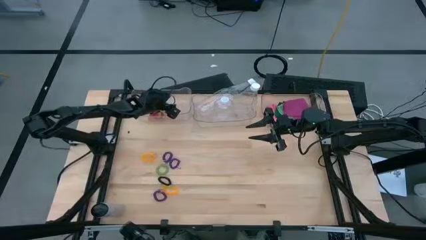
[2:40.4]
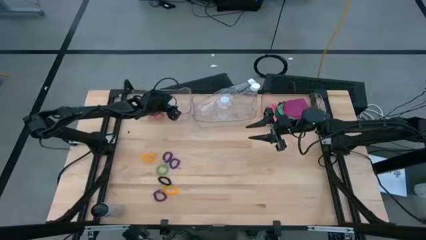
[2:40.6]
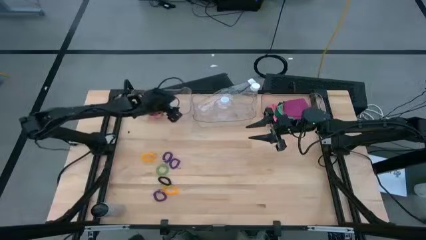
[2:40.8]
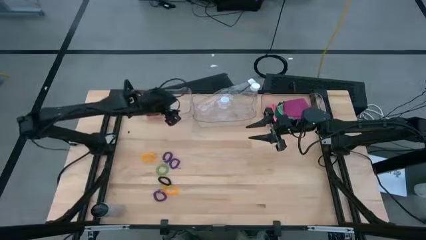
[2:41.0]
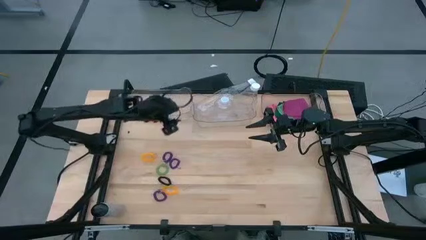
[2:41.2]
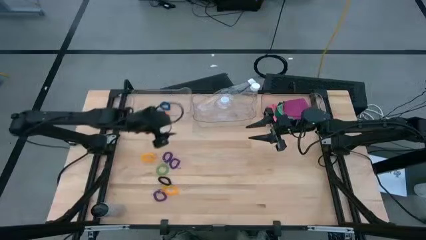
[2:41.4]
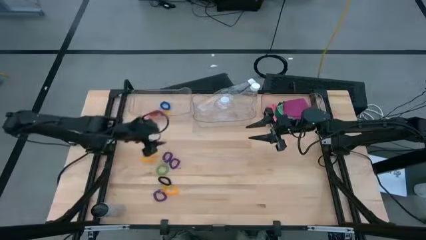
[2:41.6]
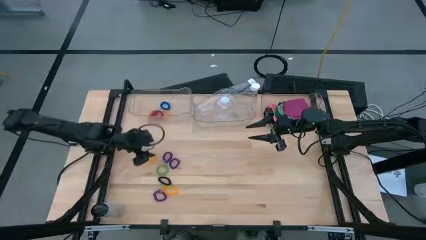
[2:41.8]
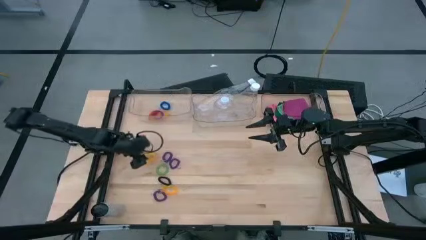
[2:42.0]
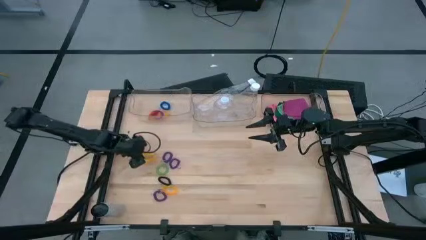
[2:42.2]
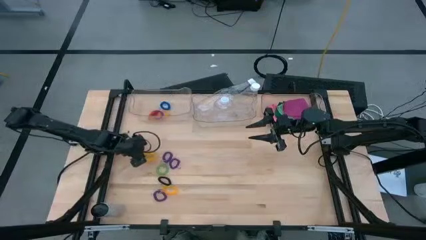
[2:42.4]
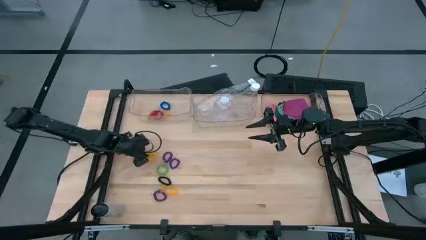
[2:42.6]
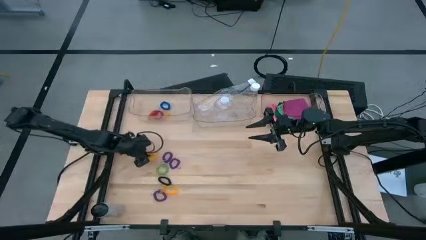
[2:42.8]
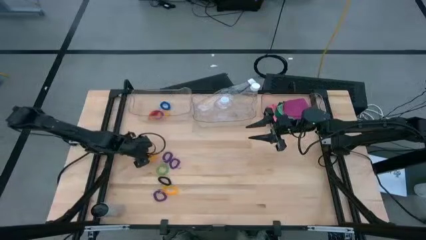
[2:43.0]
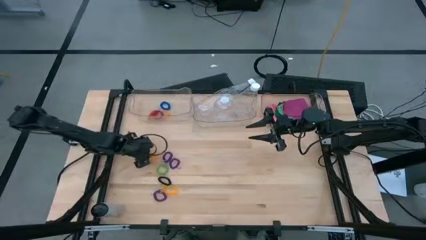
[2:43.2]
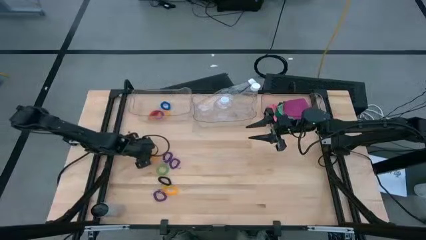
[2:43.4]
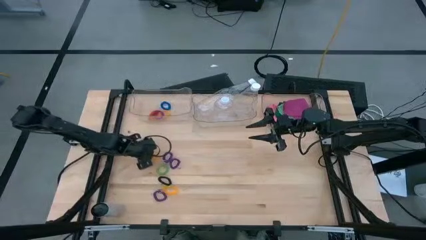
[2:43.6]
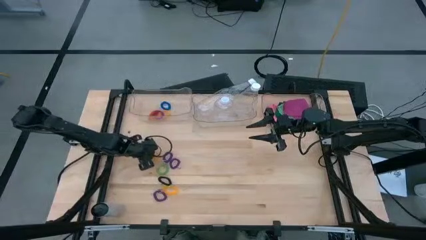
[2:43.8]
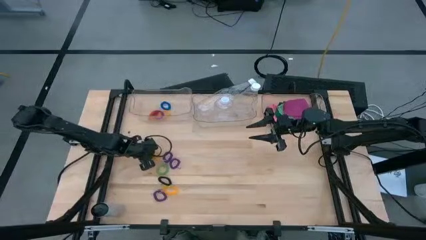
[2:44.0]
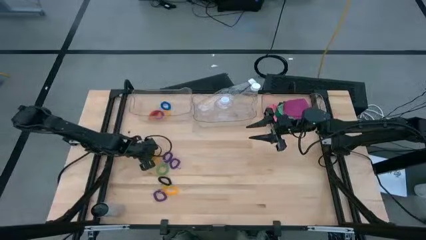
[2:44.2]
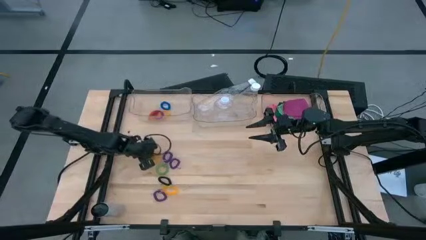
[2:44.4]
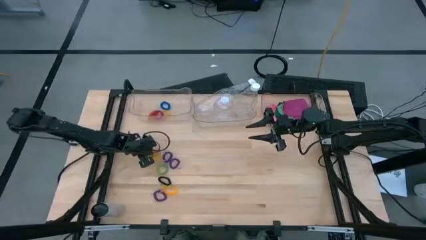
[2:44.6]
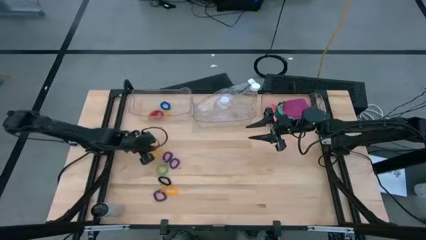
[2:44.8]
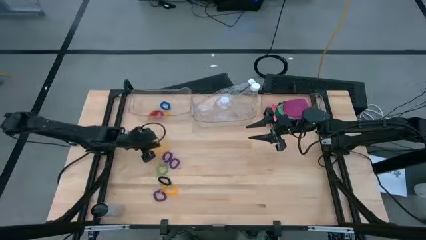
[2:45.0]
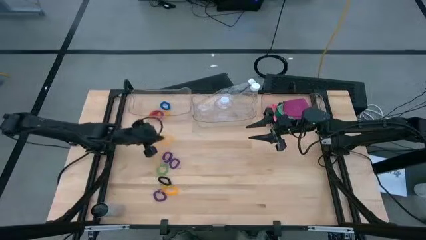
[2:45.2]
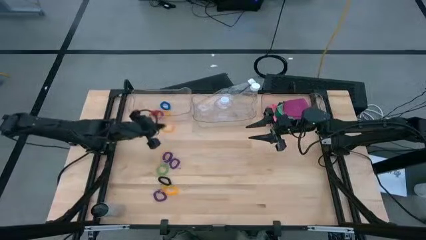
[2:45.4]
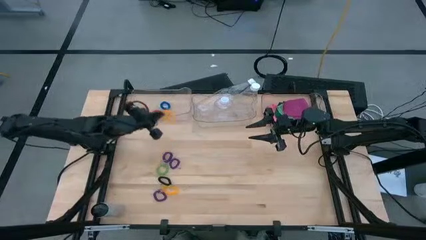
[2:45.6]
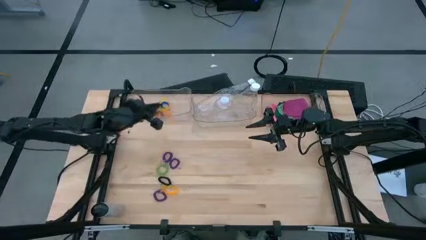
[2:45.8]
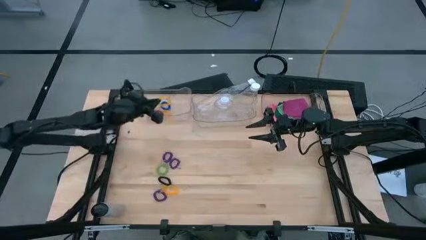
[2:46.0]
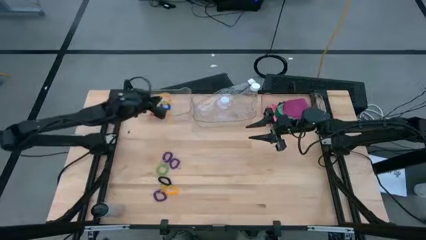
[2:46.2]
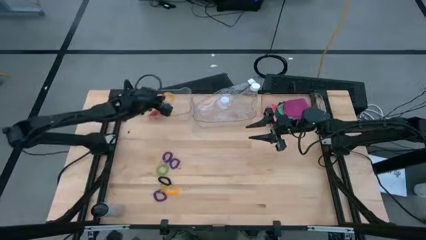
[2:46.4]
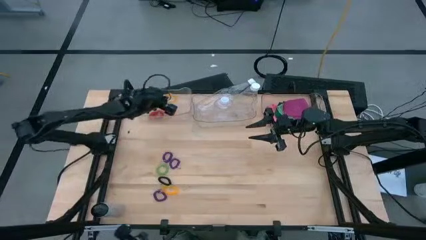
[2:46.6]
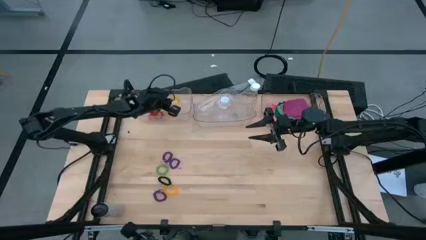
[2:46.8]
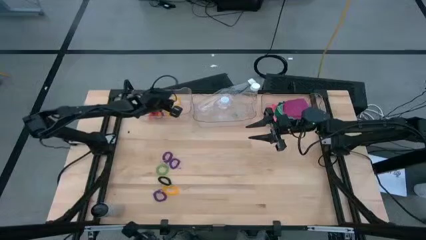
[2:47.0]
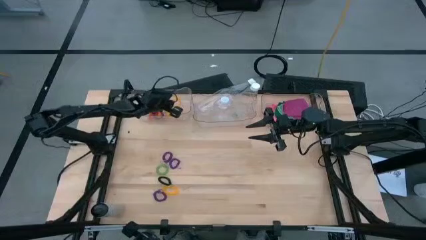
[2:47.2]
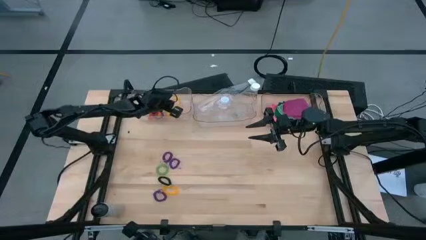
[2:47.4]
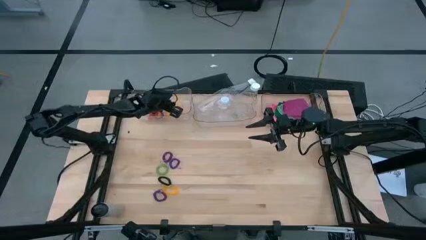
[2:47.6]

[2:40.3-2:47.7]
Task: Pick & Place Sports Items
Put the top yellow spring keychain into the left transparent bin

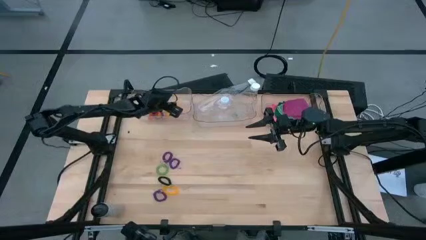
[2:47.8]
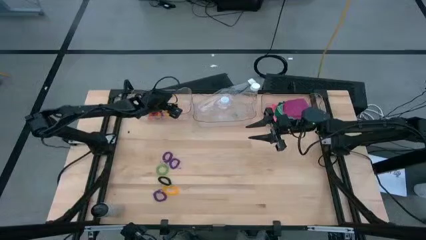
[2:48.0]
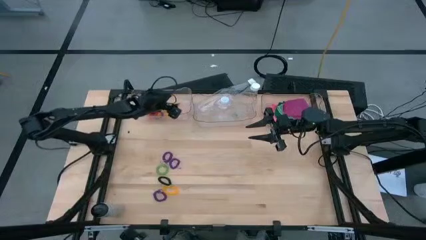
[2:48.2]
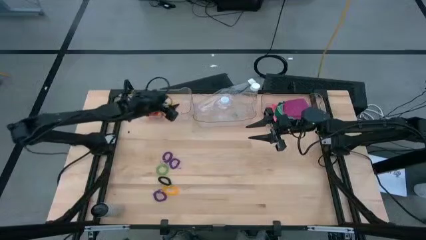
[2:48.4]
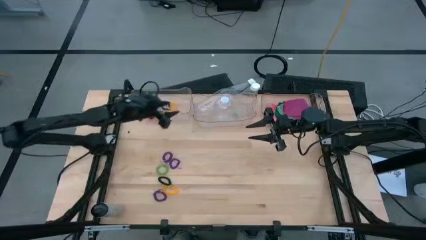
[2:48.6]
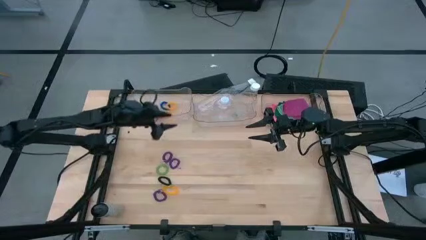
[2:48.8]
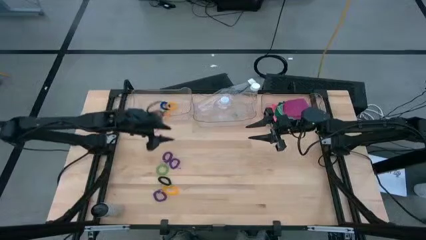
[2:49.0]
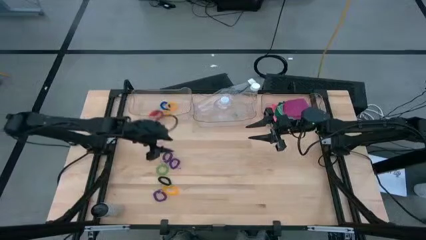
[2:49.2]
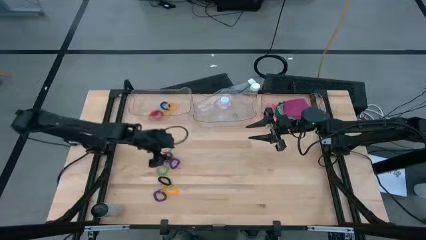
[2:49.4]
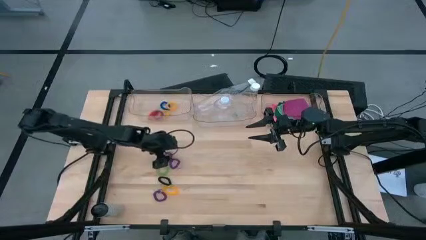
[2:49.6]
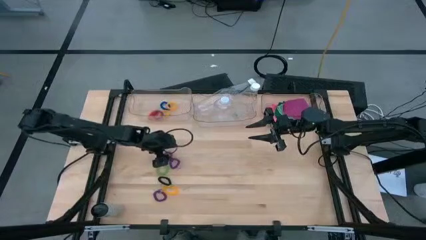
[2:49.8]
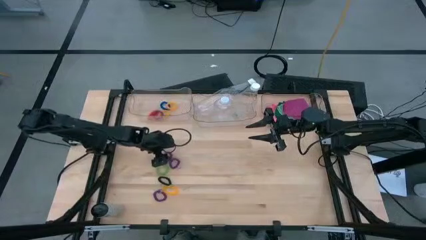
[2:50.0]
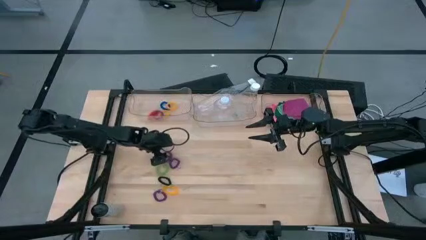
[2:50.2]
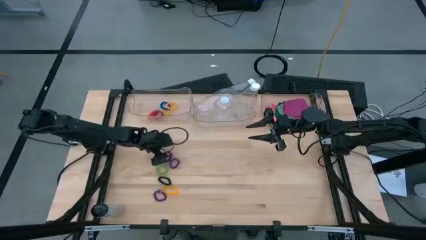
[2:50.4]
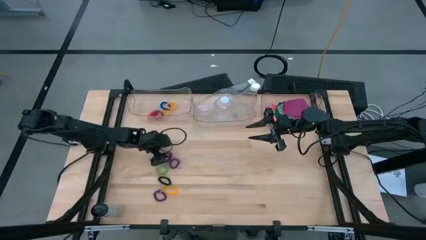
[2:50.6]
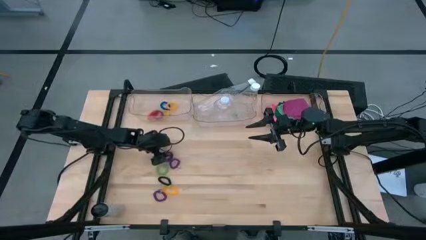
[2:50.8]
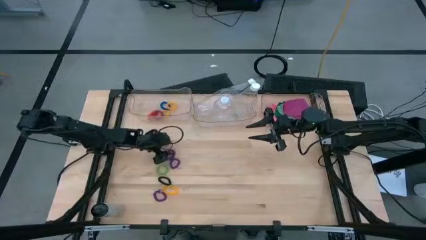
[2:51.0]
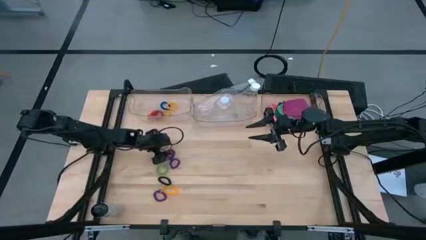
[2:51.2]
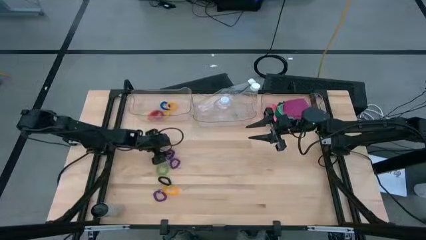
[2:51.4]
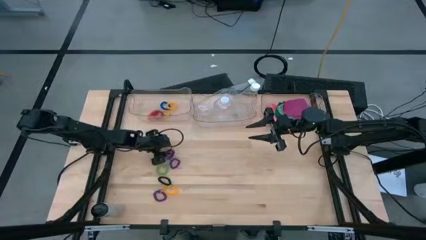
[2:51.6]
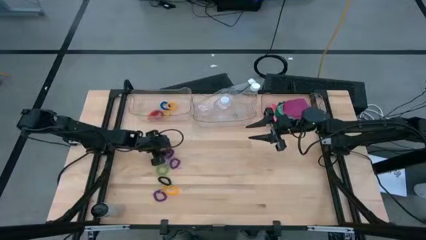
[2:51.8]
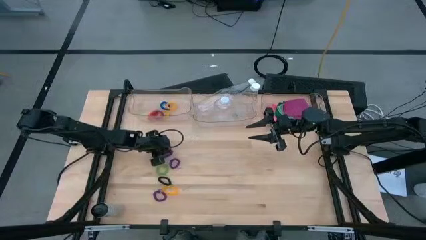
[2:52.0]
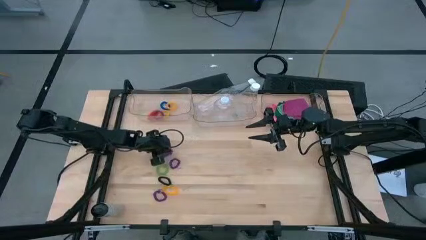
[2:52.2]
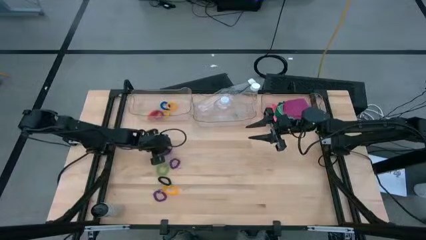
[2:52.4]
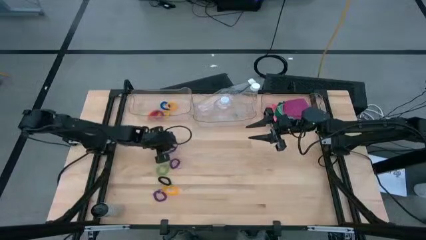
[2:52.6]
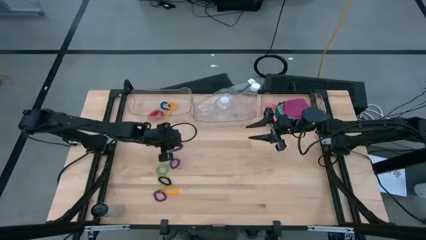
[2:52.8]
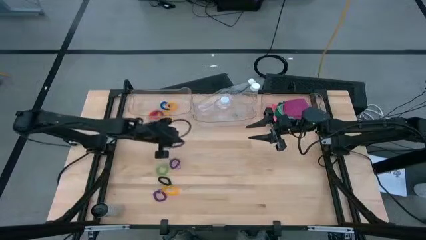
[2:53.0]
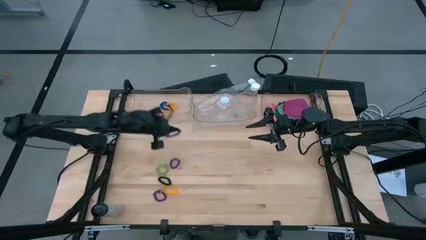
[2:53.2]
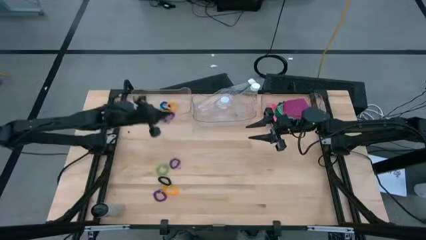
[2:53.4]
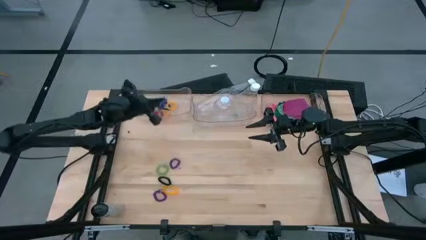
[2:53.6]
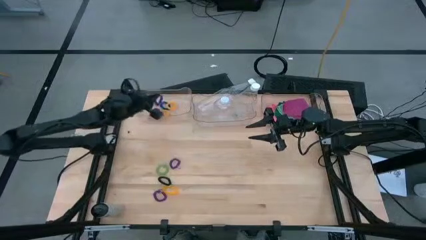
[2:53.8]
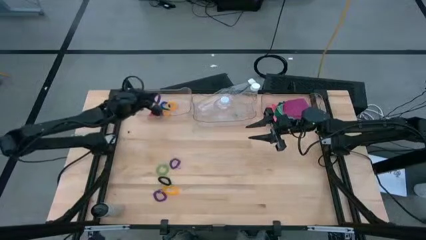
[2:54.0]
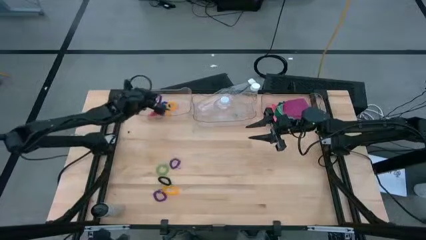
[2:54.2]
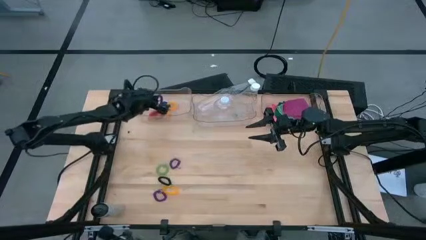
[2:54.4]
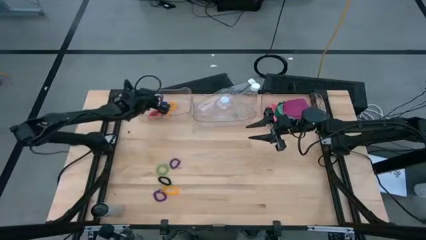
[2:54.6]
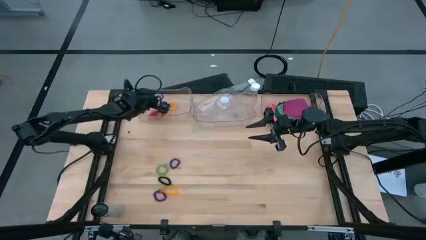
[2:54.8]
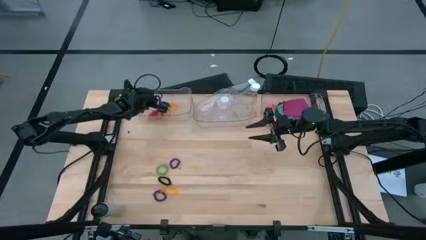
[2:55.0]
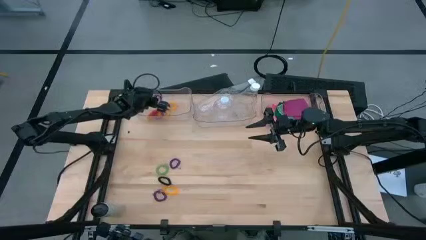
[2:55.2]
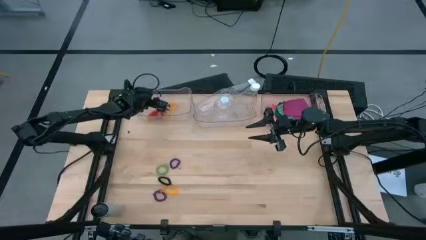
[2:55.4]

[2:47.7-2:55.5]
Put the top violet spring keychain into the left transparent bin
